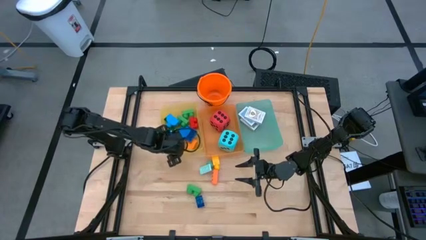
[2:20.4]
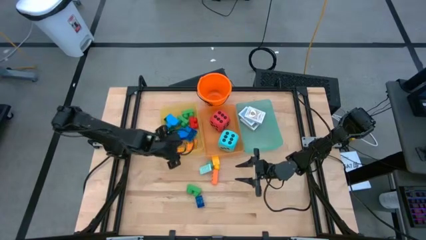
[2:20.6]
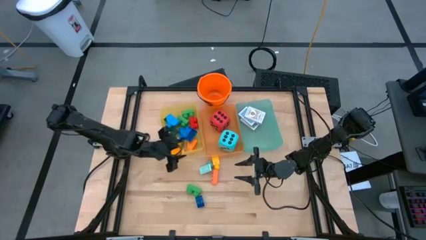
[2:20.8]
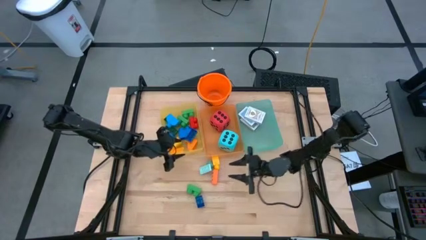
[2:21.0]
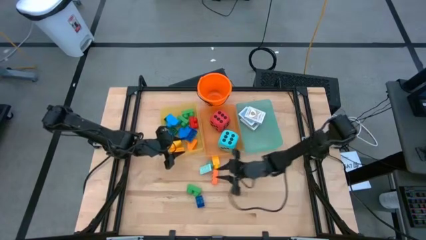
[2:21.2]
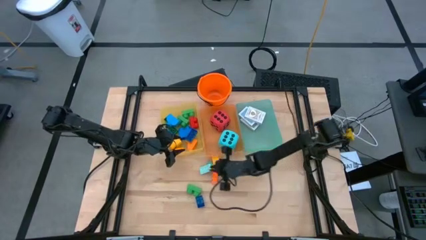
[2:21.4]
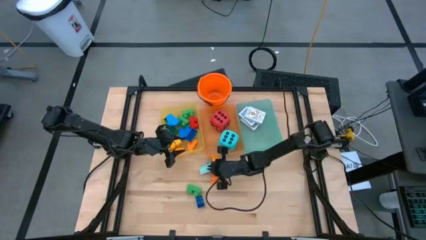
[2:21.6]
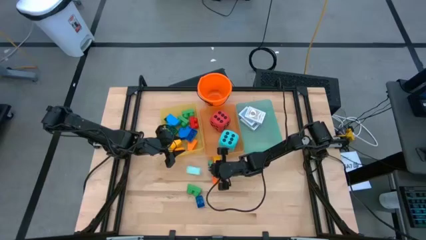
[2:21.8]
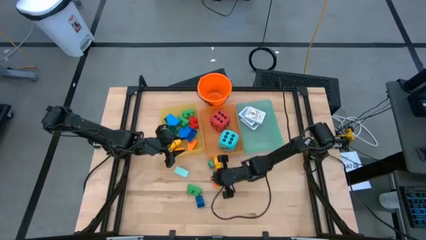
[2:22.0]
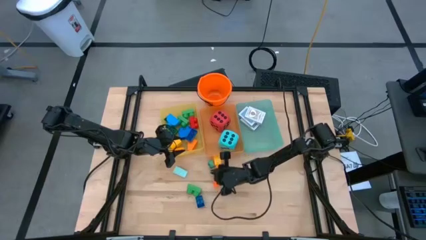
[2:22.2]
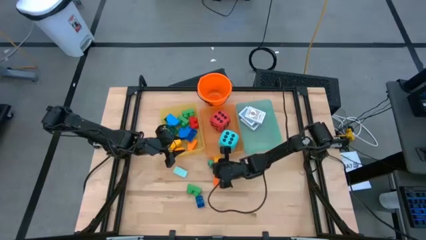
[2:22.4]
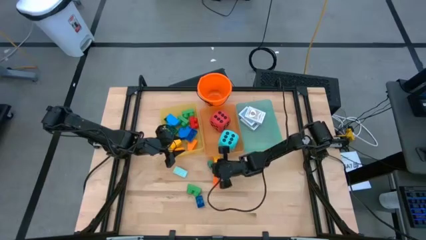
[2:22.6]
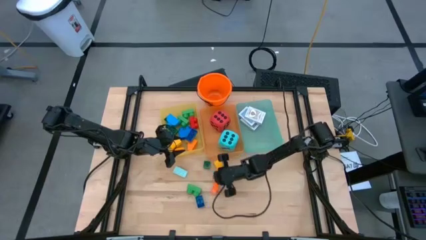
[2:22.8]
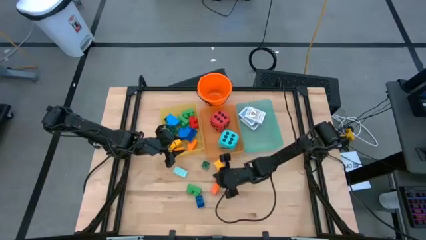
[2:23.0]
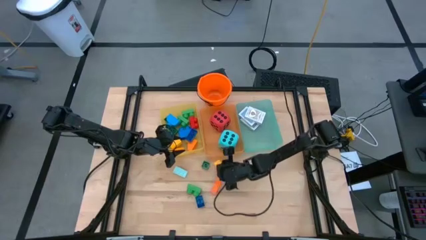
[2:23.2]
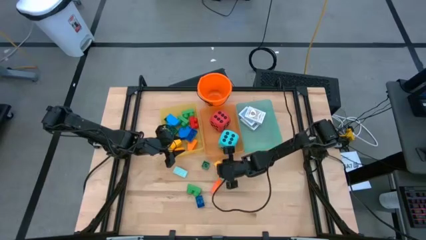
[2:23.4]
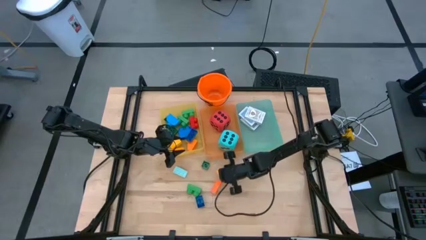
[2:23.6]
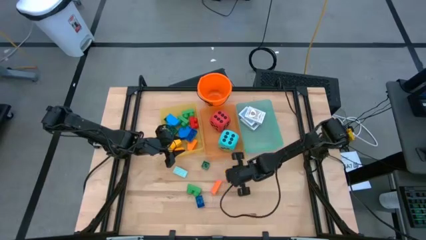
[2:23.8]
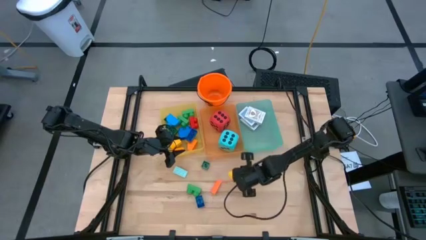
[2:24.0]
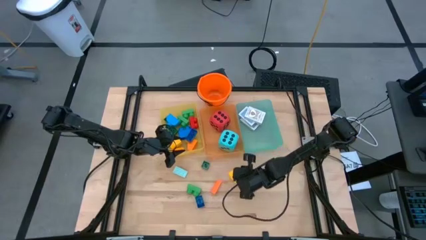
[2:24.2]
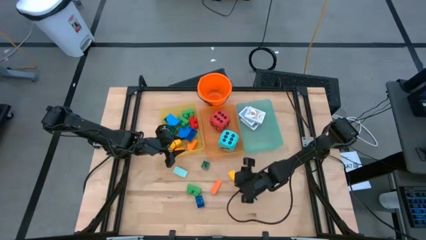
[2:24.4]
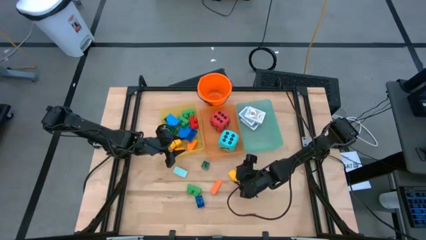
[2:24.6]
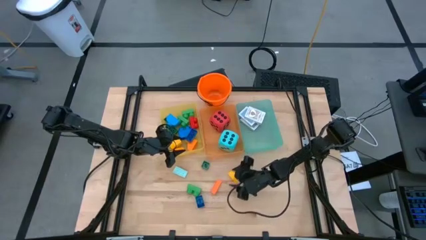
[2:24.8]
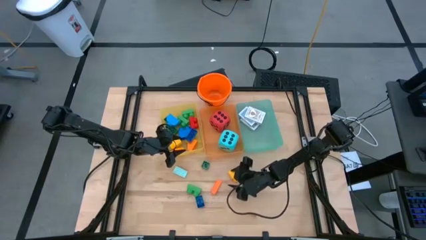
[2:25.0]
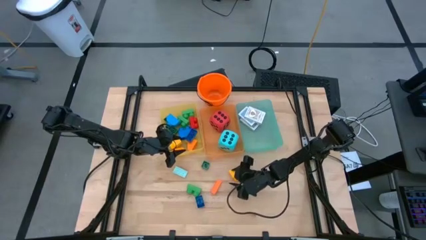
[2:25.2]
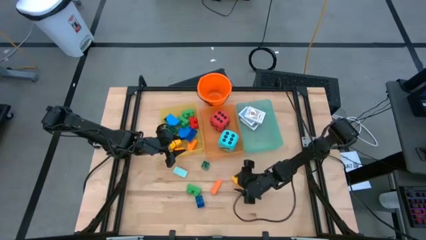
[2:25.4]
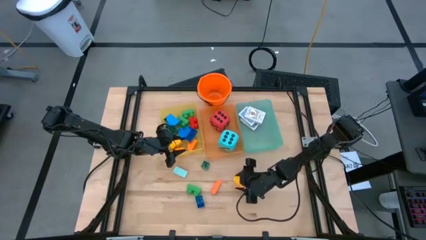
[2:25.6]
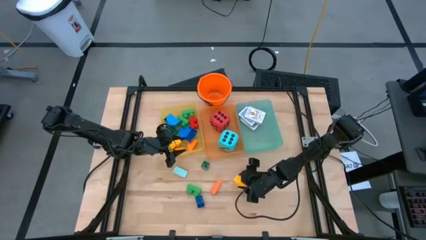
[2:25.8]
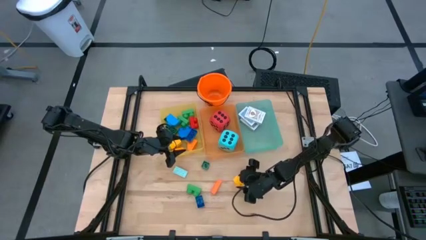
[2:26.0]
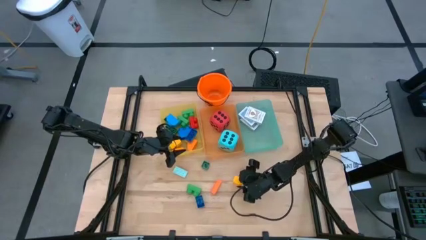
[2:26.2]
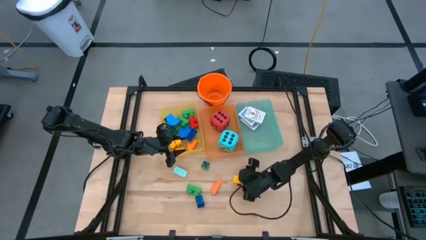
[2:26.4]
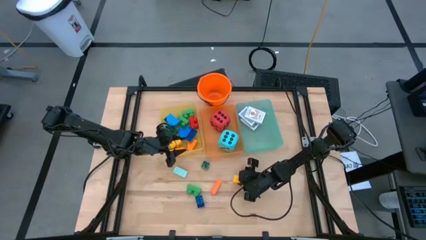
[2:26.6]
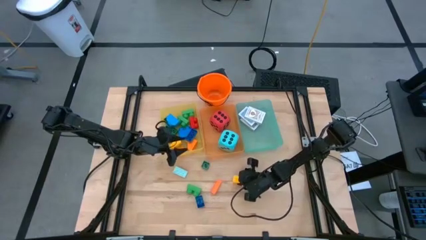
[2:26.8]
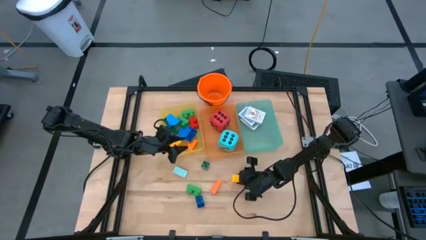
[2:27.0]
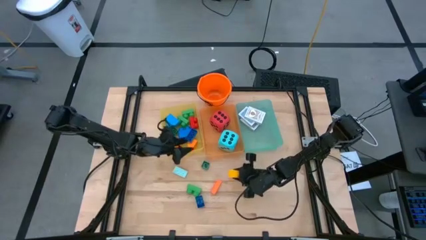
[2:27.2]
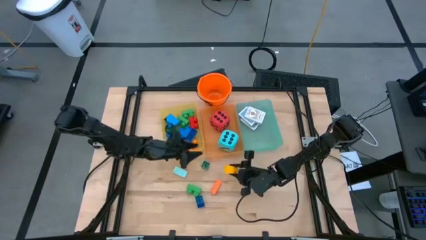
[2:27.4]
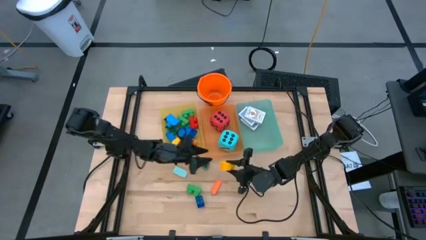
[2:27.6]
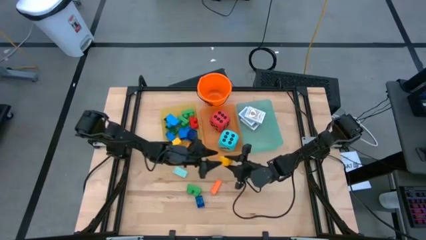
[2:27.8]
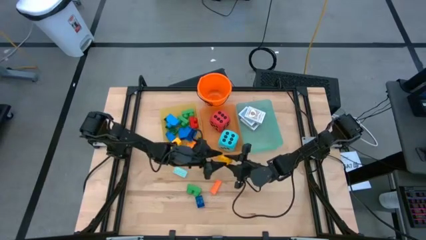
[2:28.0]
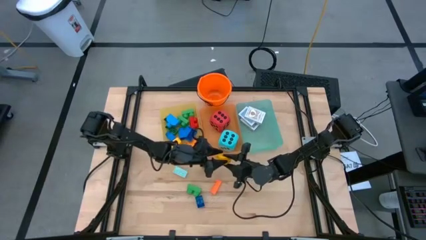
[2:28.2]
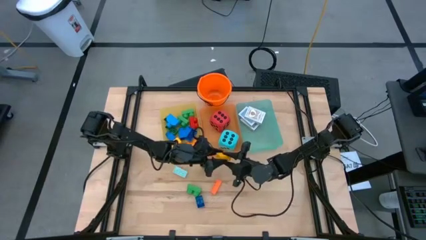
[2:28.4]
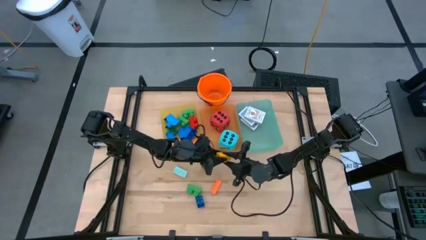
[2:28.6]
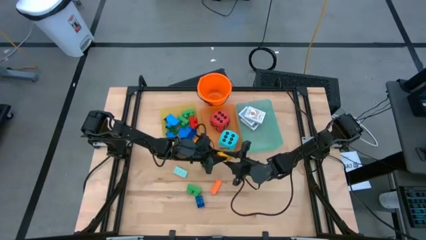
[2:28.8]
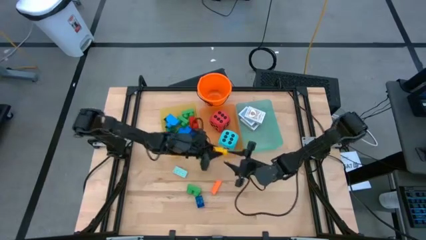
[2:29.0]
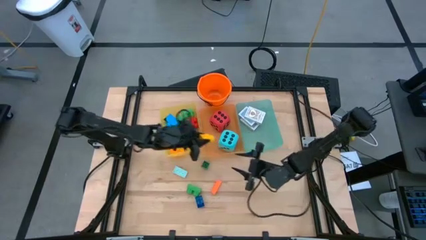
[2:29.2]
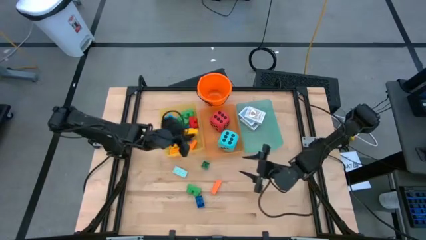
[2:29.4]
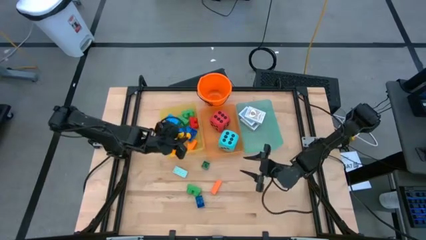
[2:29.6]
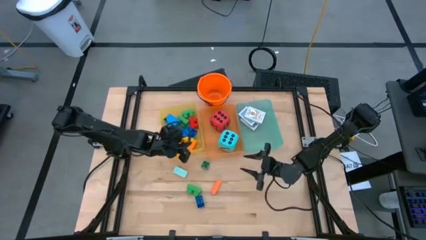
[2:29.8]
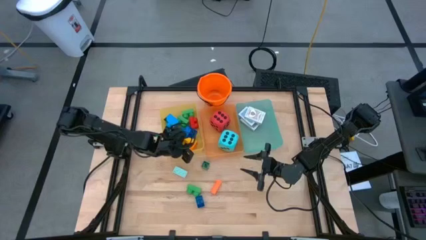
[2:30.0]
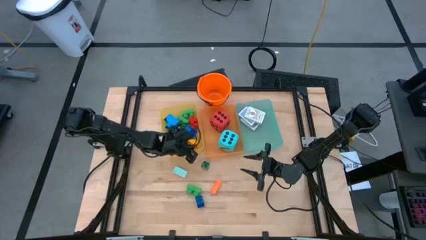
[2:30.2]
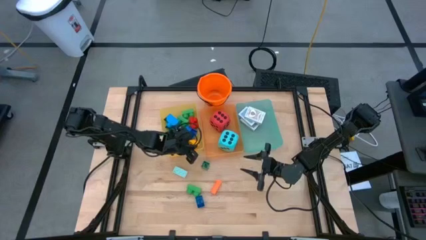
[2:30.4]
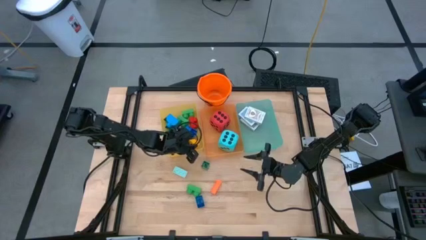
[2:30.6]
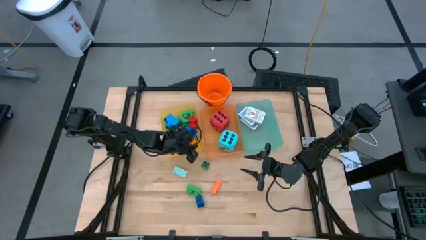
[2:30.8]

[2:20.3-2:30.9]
Task: Pick & Place Toys
Put the yellow game piece into the yellow bin

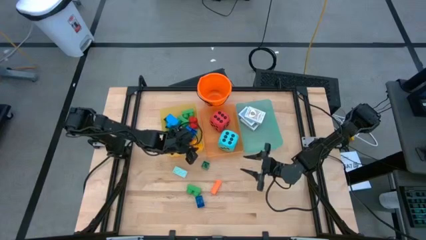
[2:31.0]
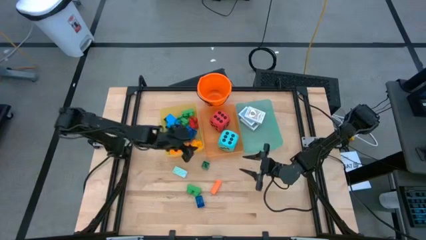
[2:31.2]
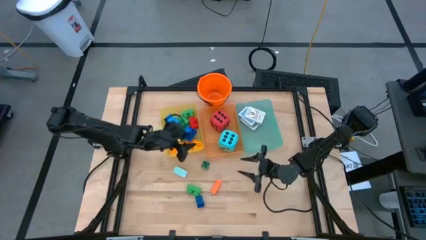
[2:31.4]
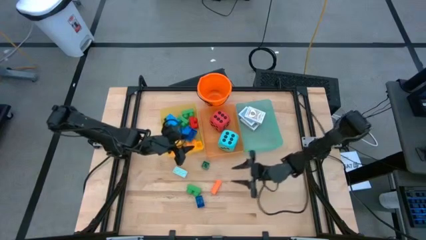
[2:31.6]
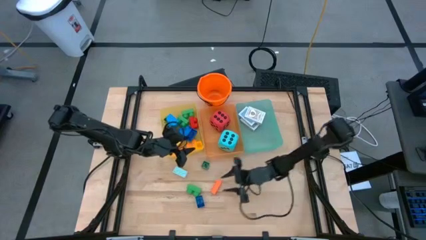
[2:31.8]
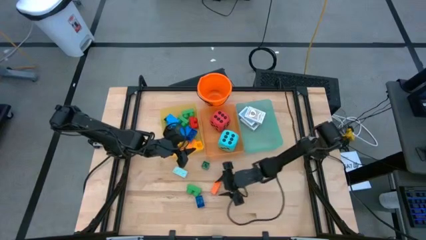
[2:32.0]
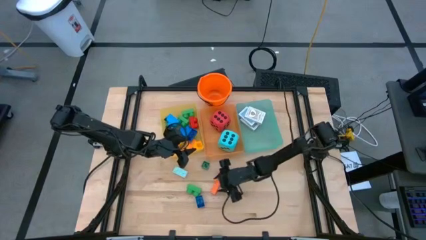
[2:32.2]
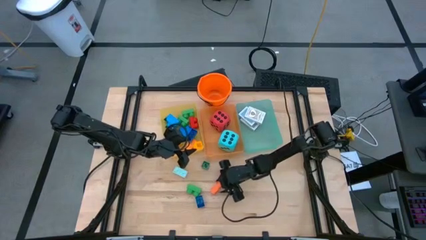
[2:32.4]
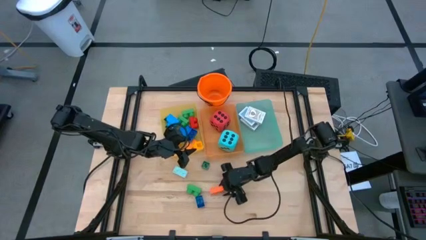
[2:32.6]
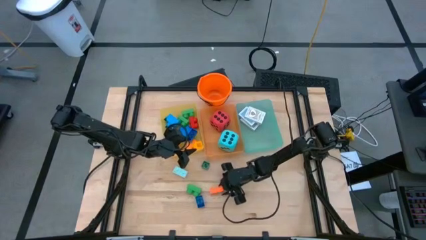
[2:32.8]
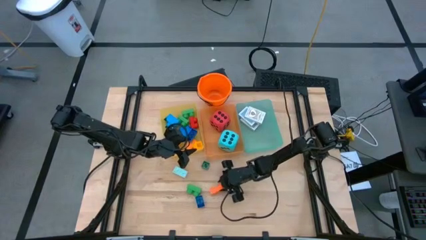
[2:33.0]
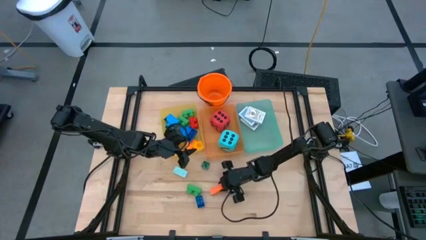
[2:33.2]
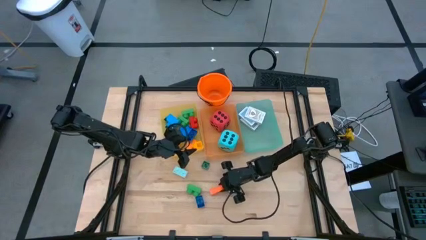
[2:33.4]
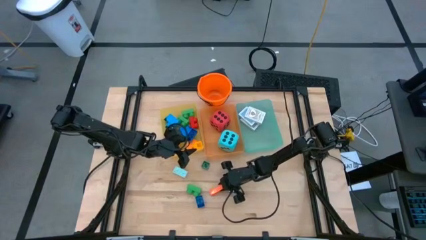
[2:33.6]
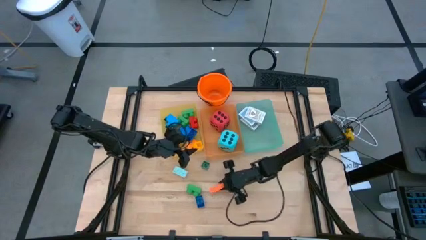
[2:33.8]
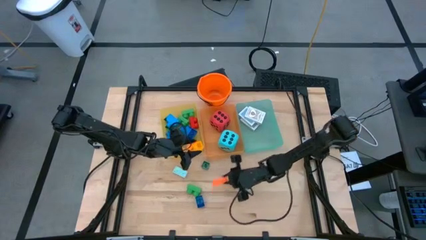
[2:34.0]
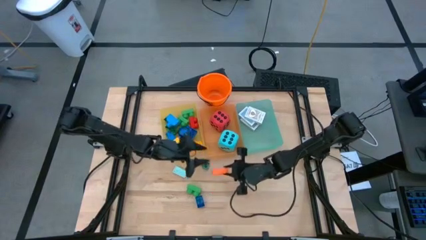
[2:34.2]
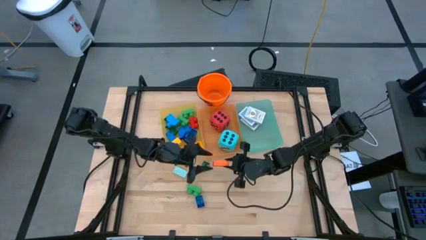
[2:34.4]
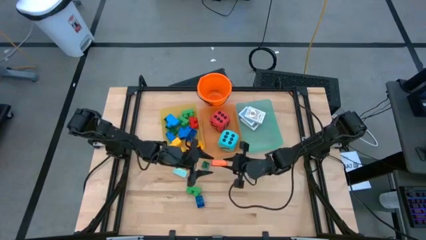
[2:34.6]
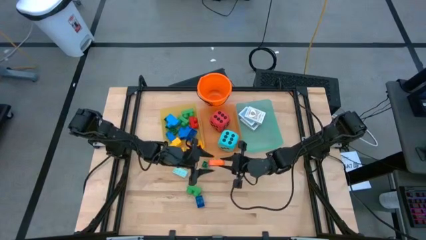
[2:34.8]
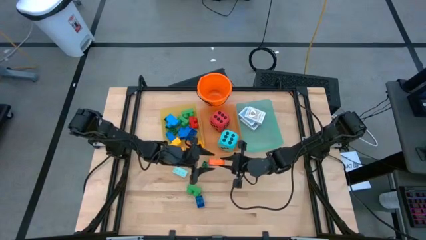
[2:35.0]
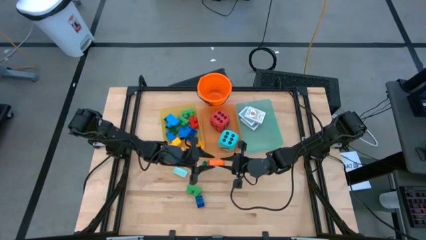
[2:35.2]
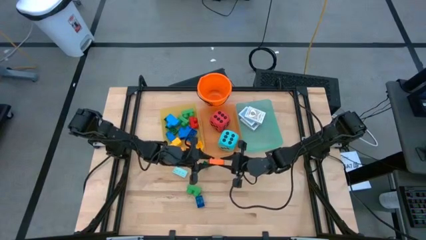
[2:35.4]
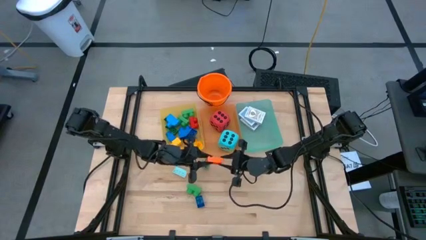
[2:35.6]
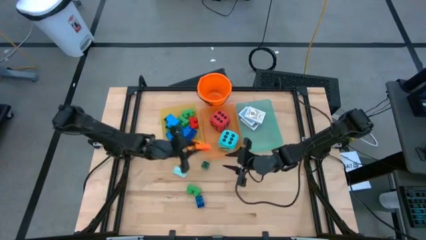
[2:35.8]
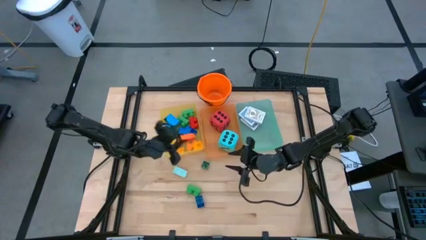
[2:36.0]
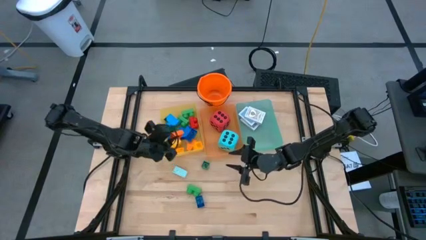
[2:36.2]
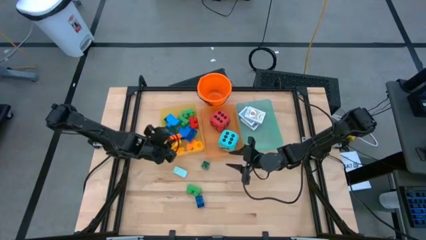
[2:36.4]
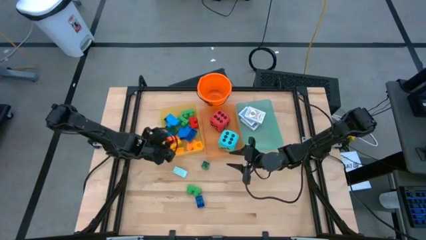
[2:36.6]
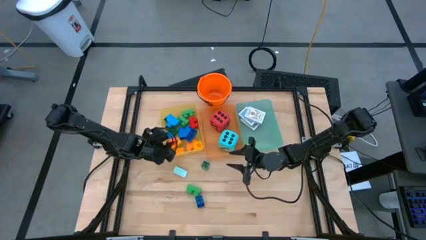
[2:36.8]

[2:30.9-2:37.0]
Put the orange game piece into the yellow bin
